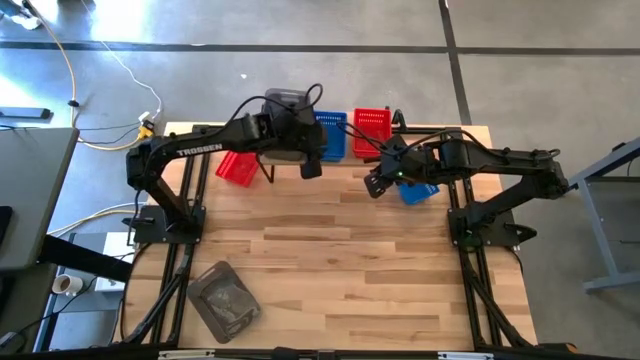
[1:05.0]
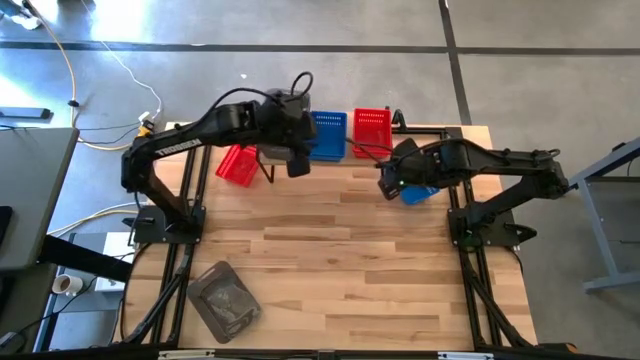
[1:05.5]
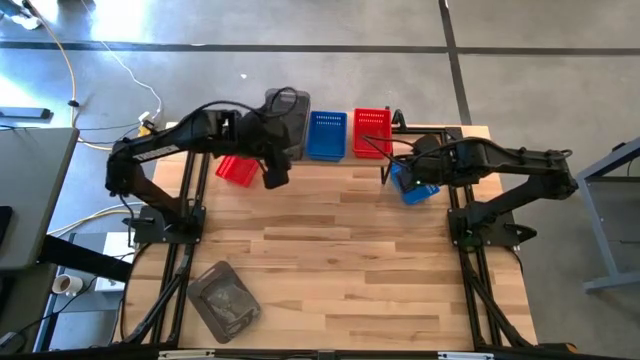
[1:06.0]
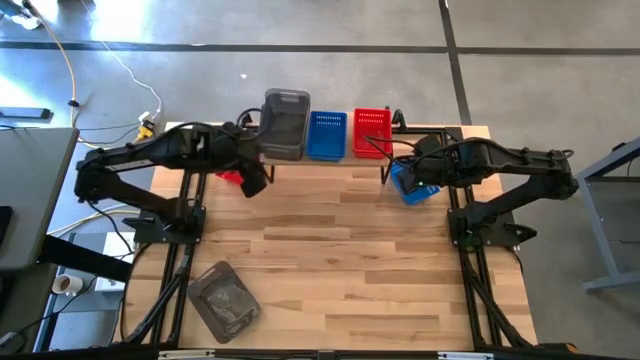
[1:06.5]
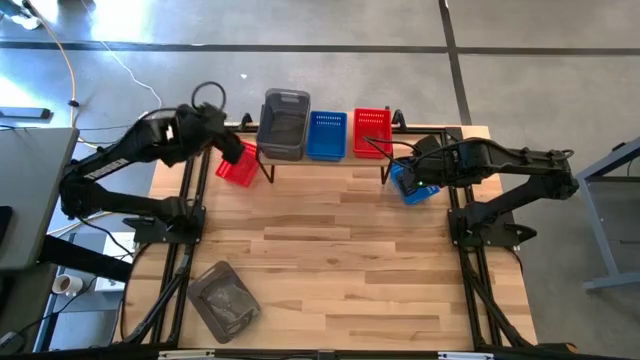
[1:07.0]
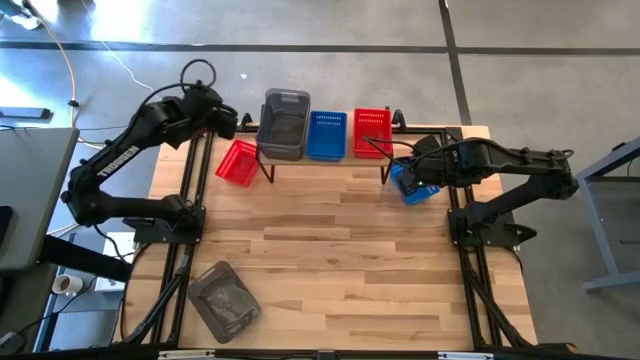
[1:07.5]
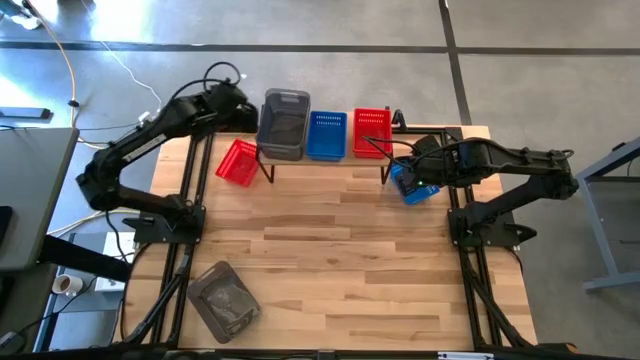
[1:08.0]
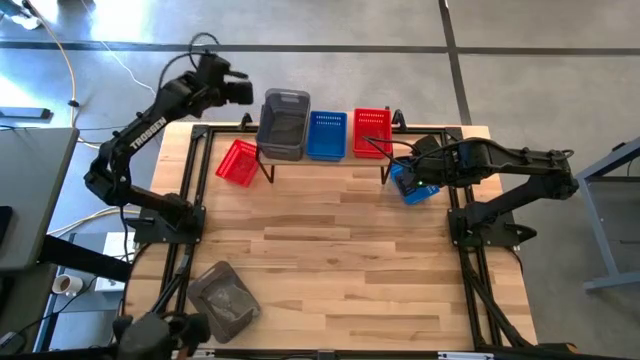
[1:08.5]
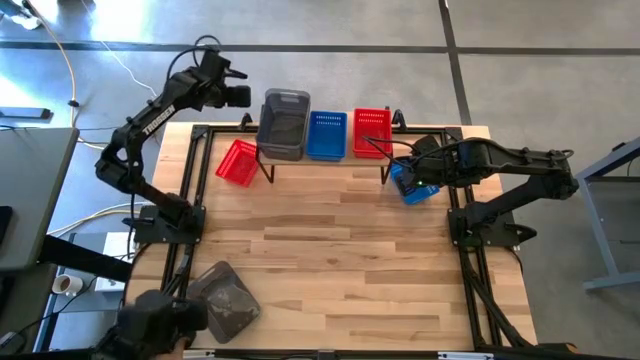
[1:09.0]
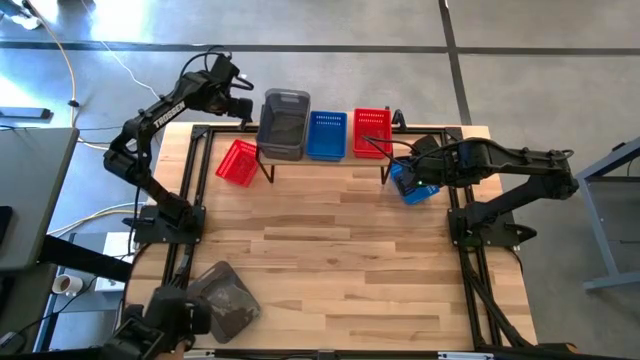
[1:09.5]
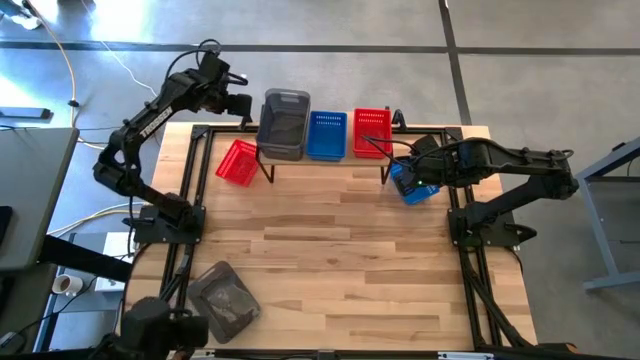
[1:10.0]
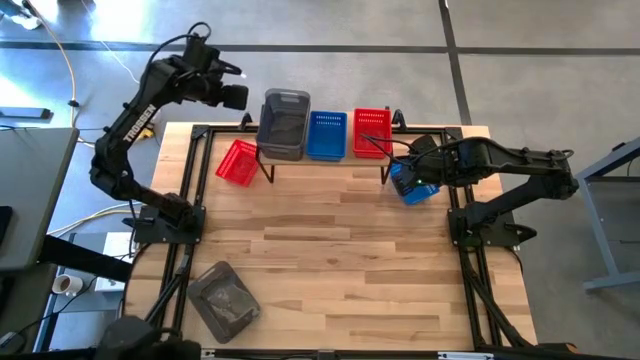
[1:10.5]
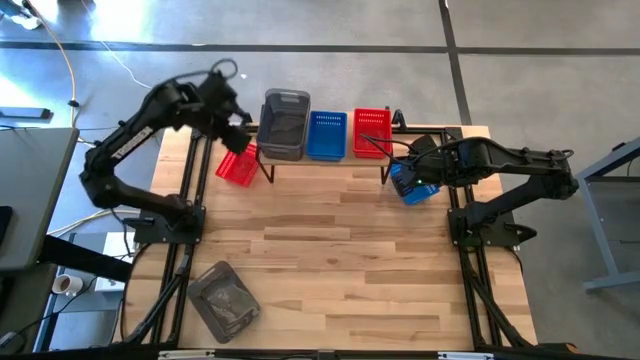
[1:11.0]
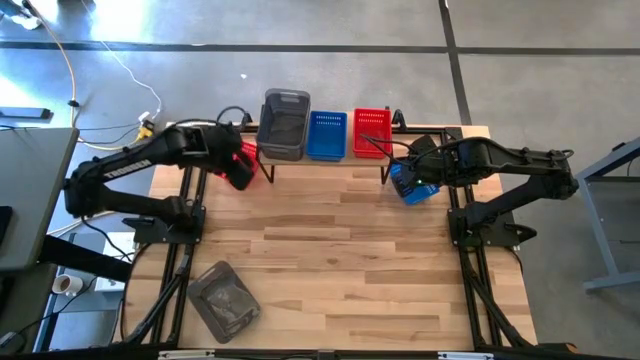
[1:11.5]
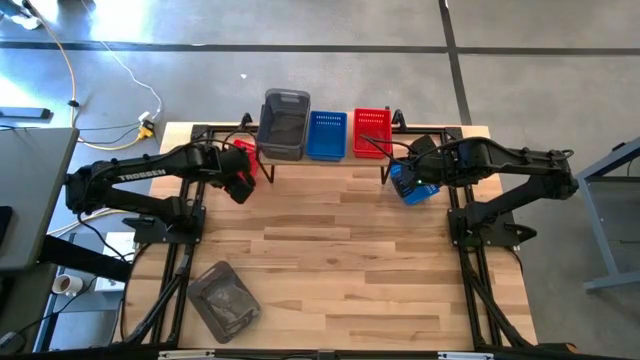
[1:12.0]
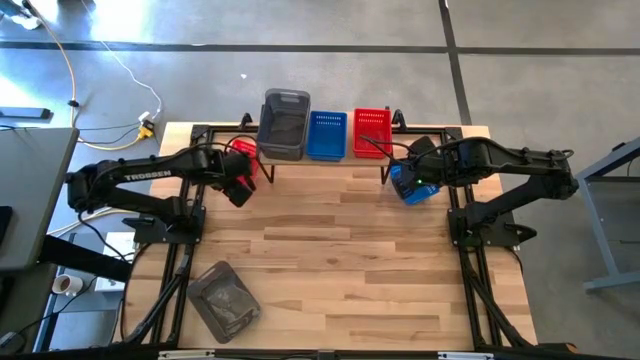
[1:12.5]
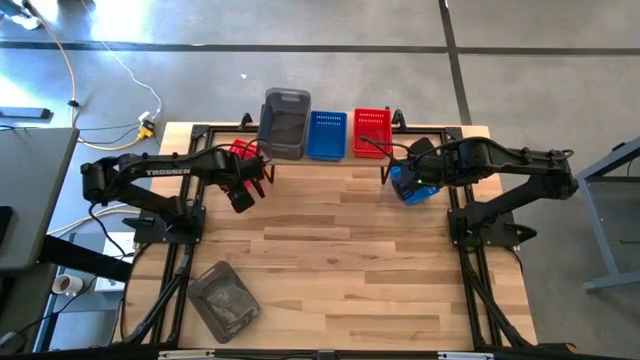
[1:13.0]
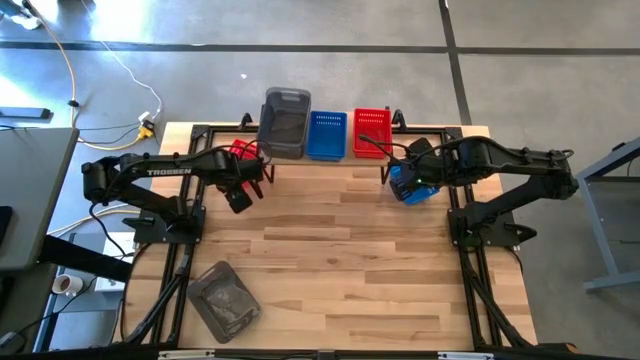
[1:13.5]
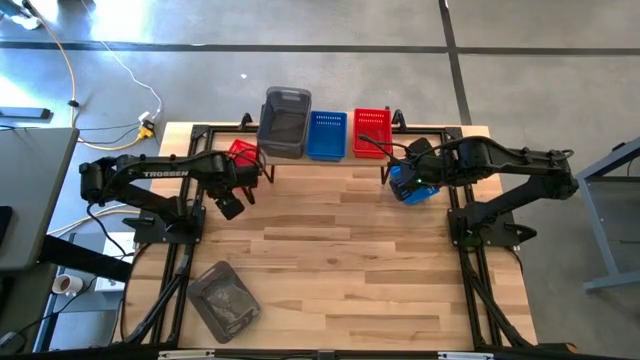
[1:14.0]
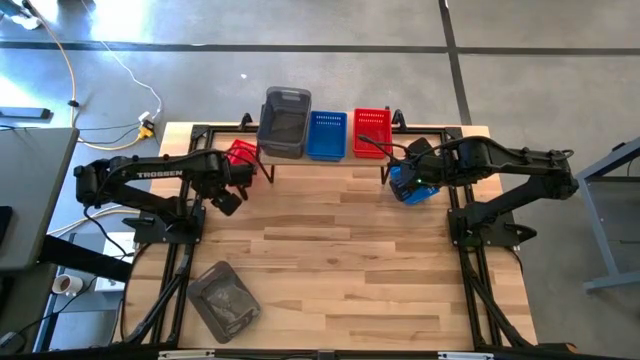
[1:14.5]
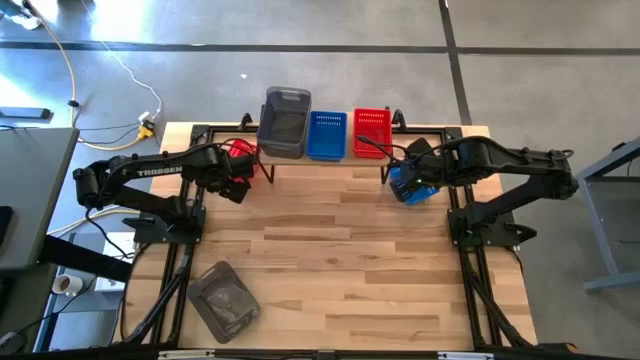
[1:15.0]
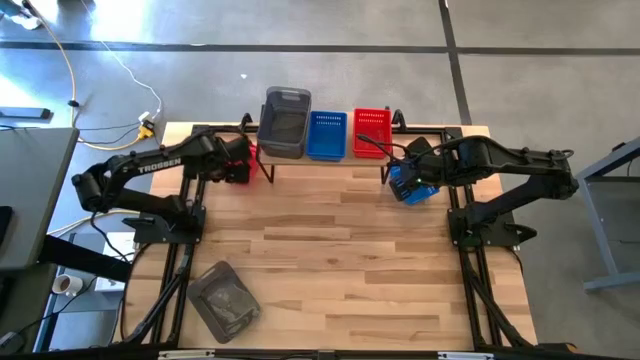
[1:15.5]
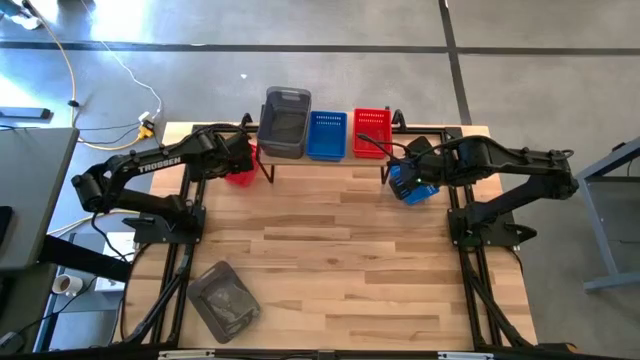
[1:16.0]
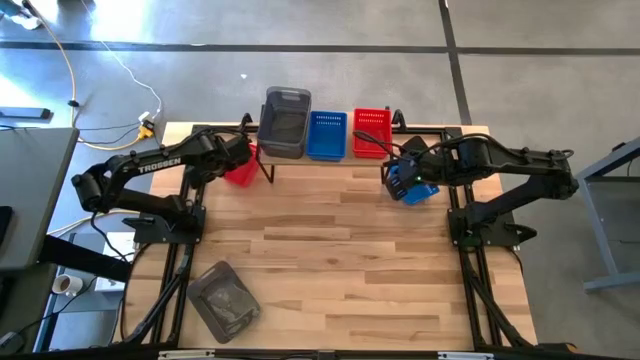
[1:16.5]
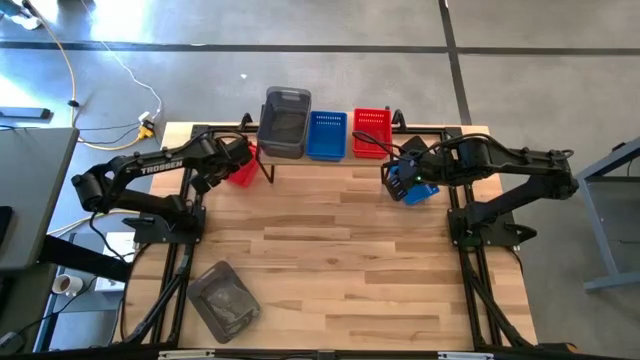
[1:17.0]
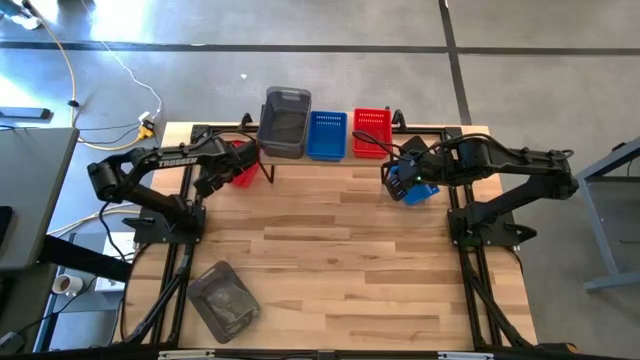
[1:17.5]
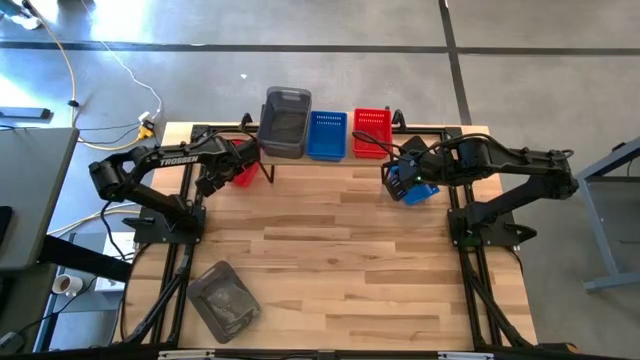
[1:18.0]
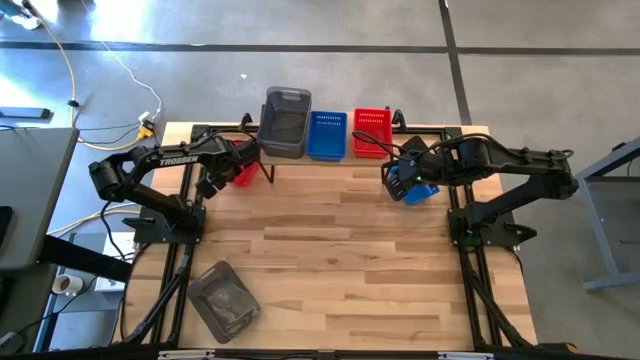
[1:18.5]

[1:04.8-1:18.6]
Task: Stack baskets on shelf by color
Stack the red bin on top of the red bin on the shelf

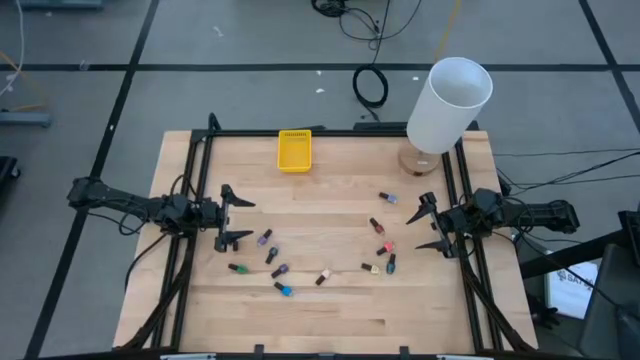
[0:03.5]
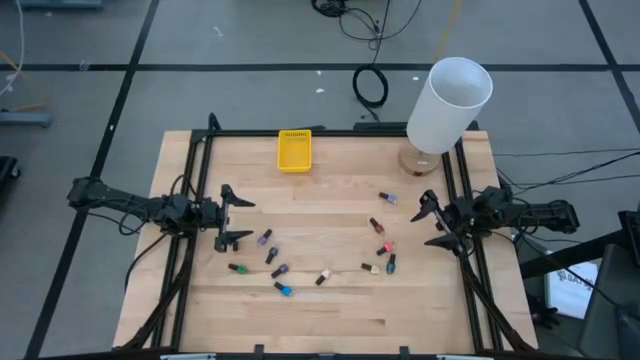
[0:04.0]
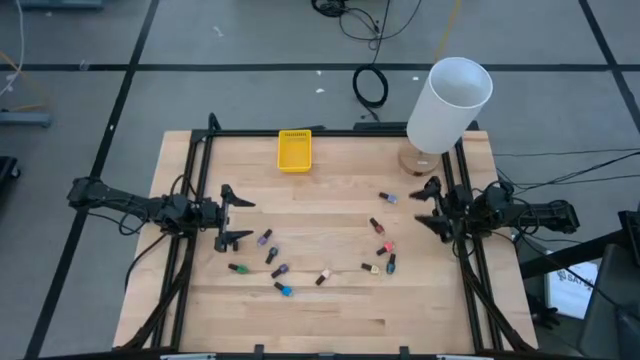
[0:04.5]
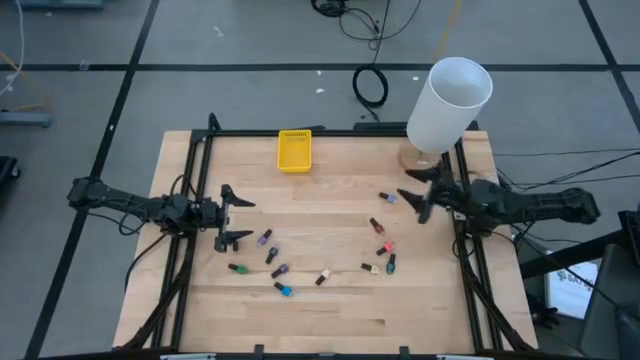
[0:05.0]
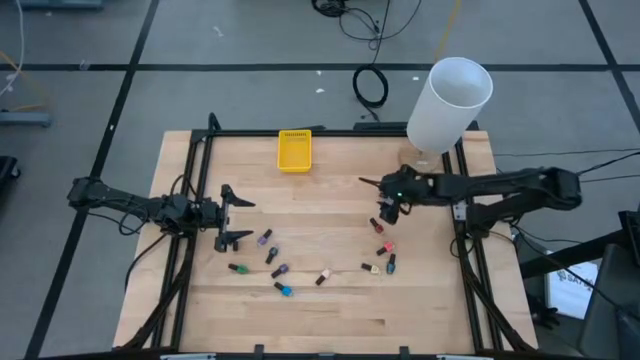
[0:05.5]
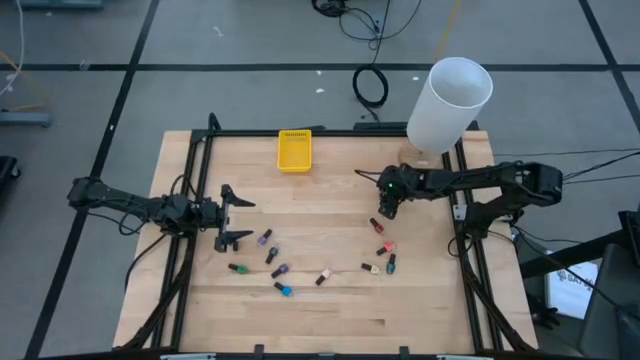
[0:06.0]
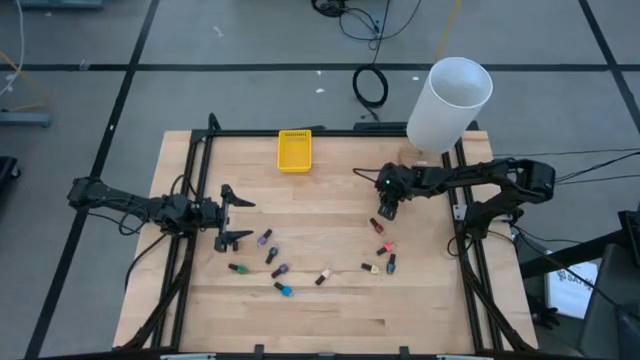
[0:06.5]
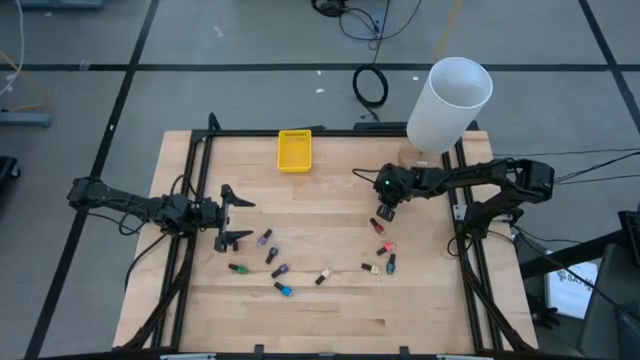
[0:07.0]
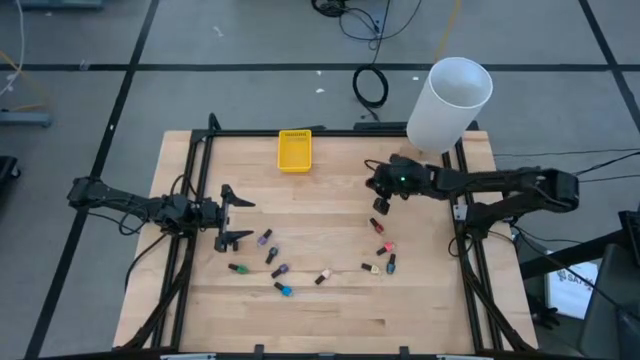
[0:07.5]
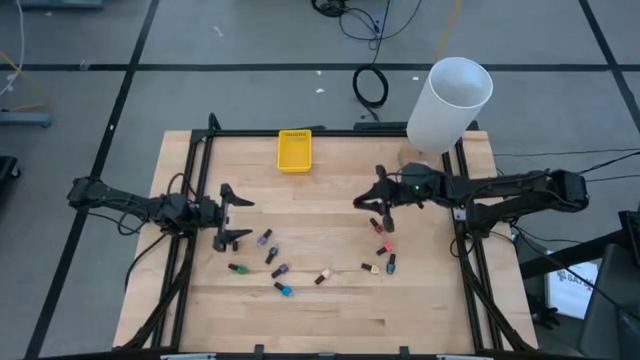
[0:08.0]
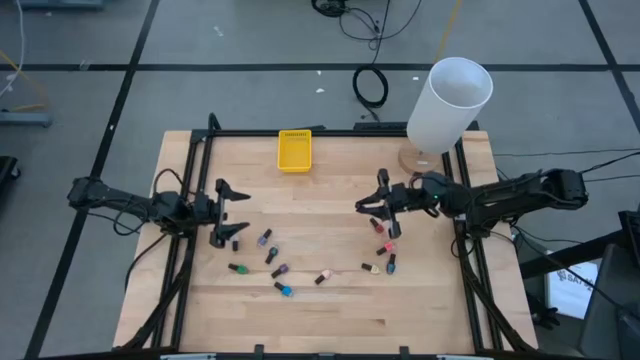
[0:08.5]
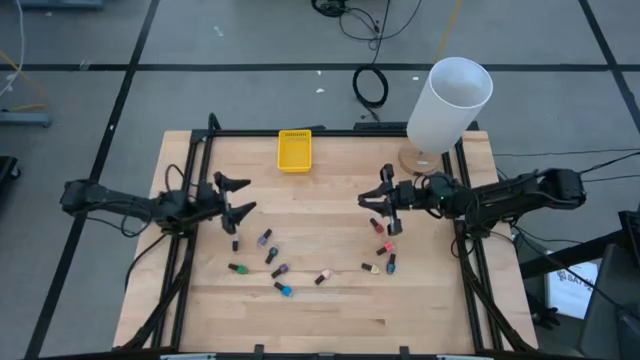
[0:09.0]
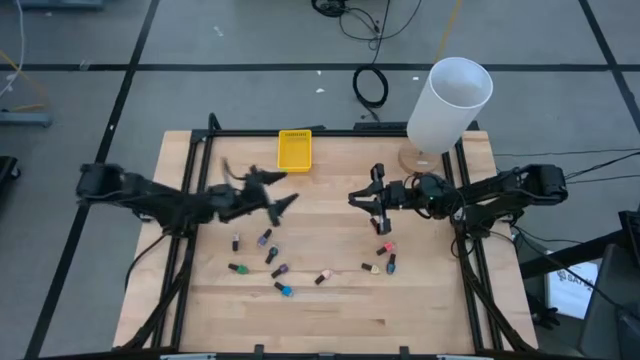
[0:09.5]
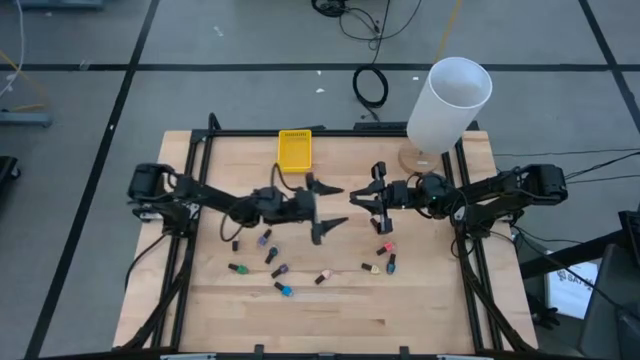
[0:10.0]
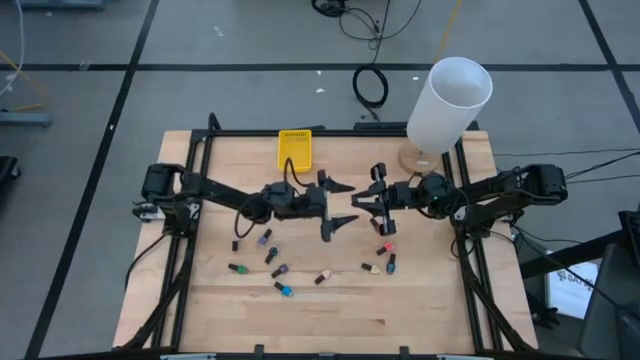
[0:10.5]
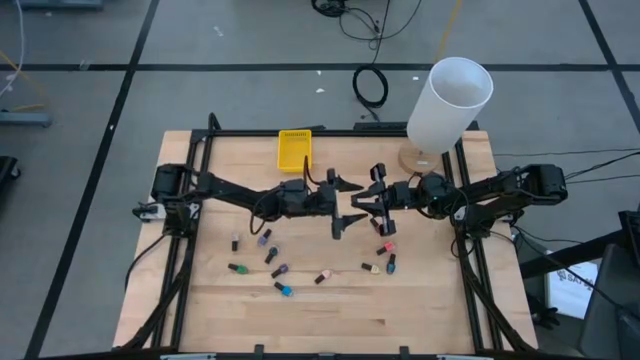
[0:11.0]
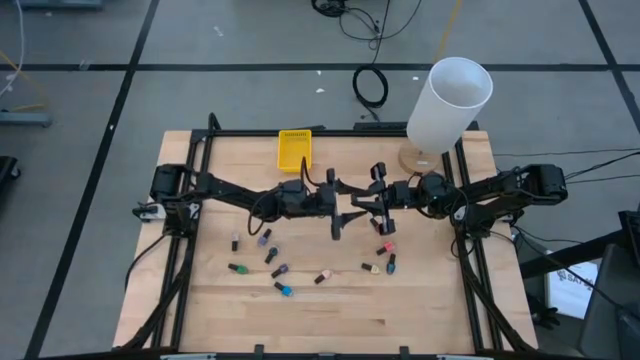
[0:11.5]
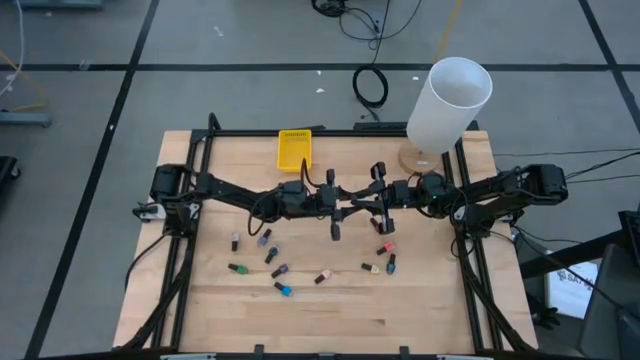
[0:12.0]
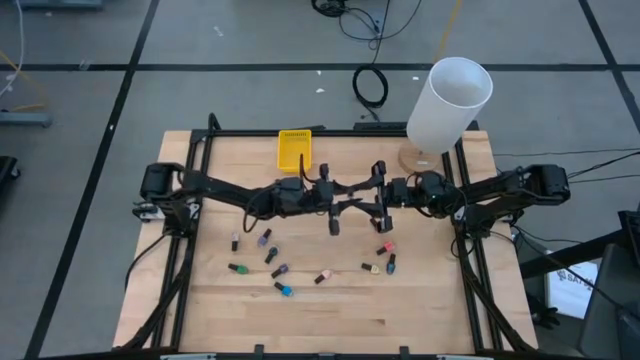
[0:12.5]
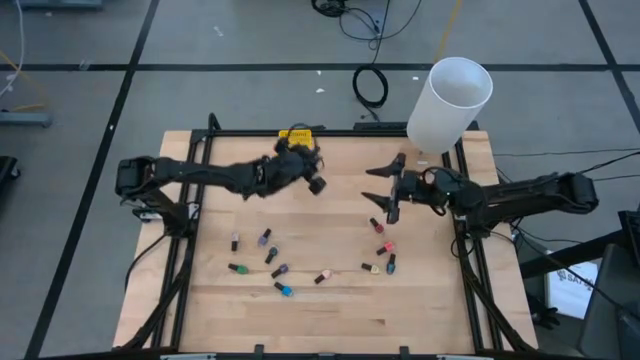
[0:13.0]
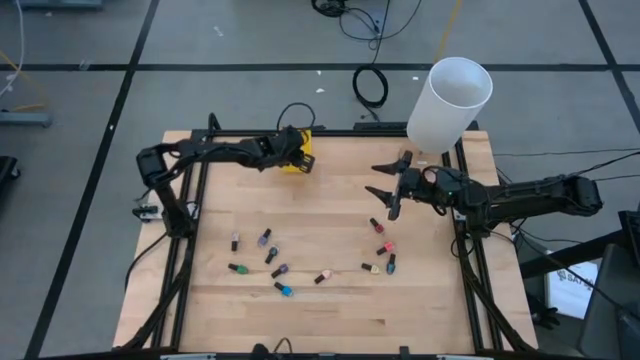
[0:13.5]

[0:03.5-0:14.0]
Task: Pick & Place Nail Polish
Put the light blue nail polish bottle into the yellow bin
